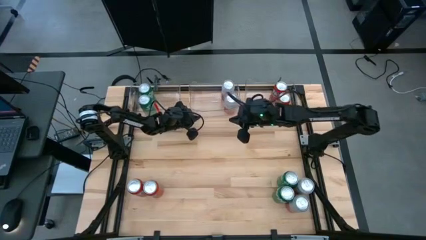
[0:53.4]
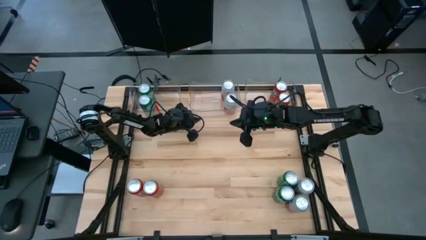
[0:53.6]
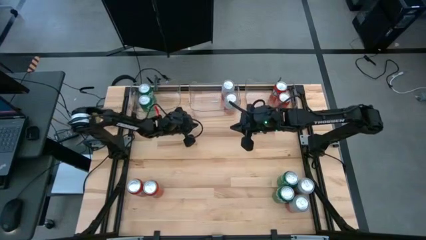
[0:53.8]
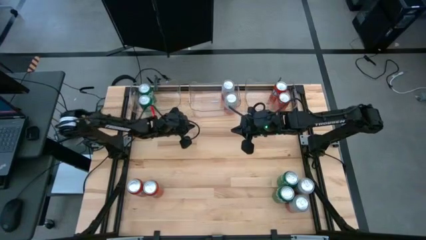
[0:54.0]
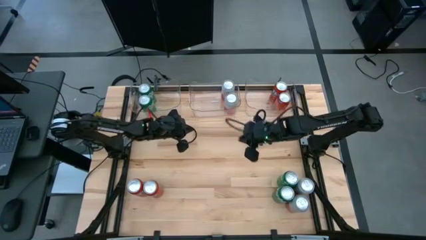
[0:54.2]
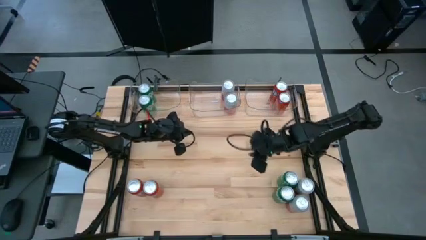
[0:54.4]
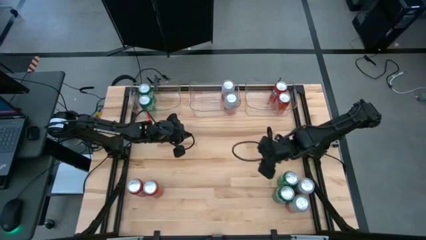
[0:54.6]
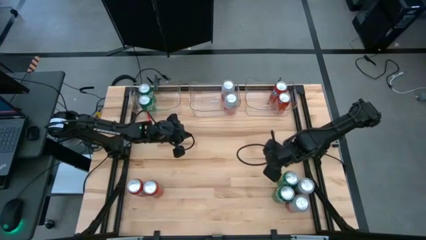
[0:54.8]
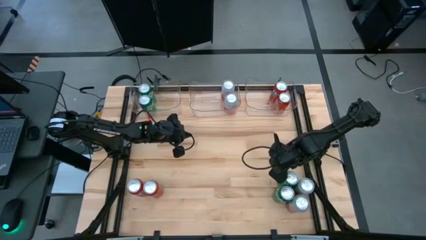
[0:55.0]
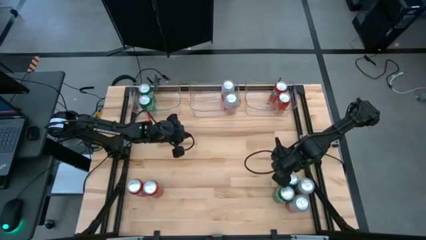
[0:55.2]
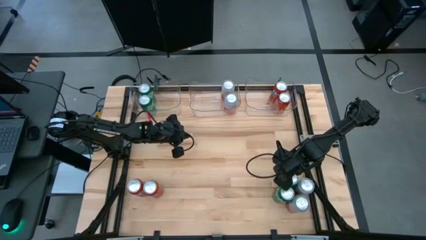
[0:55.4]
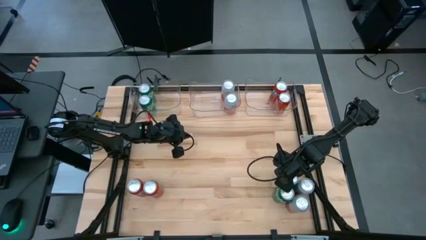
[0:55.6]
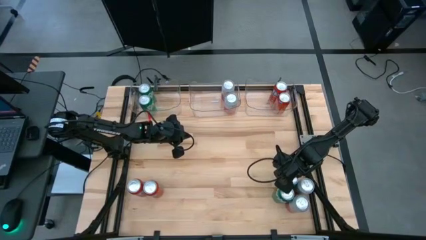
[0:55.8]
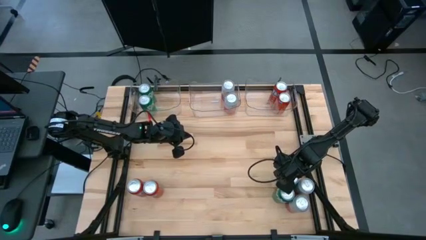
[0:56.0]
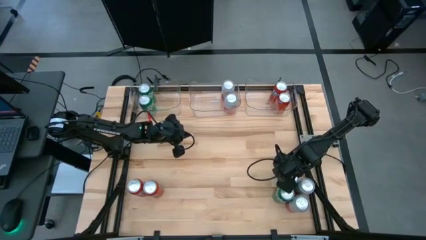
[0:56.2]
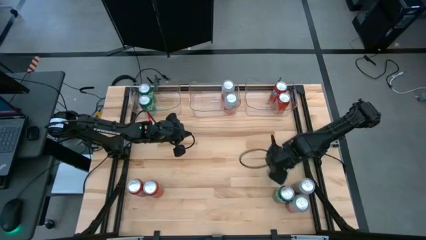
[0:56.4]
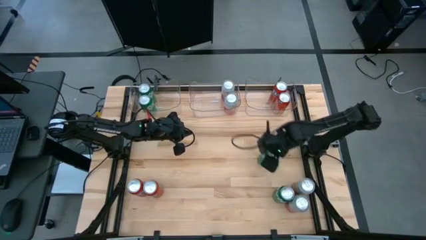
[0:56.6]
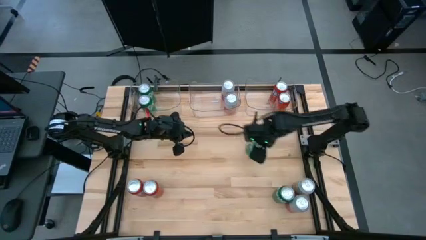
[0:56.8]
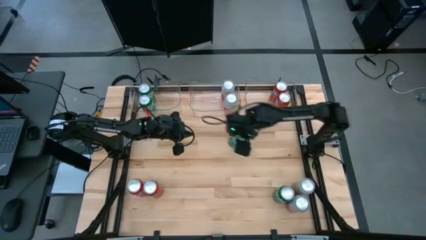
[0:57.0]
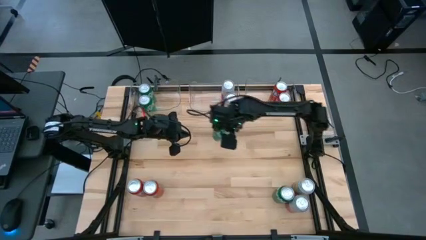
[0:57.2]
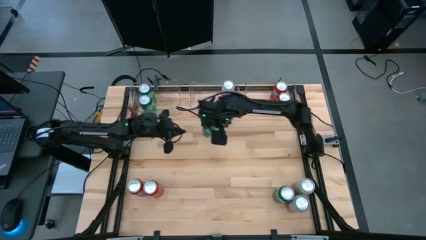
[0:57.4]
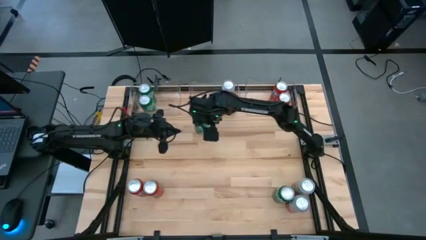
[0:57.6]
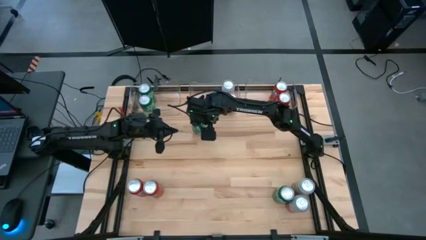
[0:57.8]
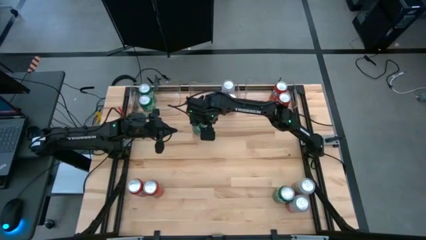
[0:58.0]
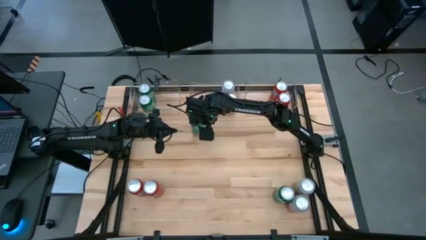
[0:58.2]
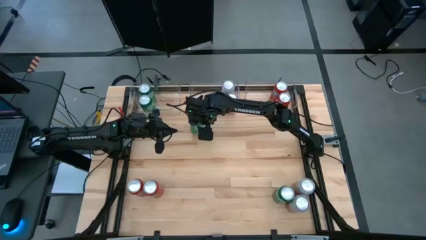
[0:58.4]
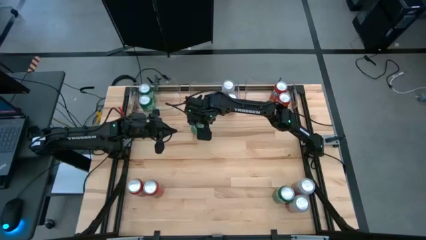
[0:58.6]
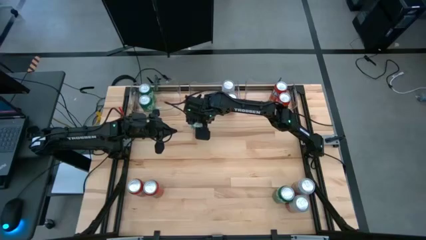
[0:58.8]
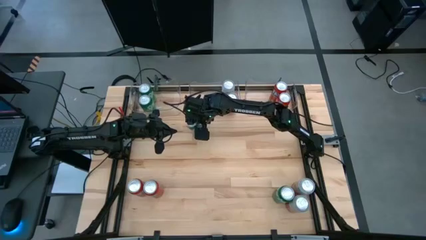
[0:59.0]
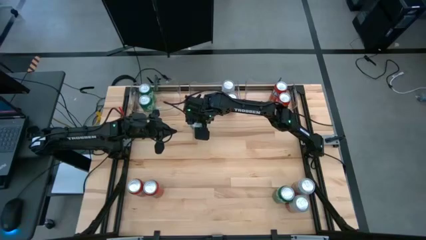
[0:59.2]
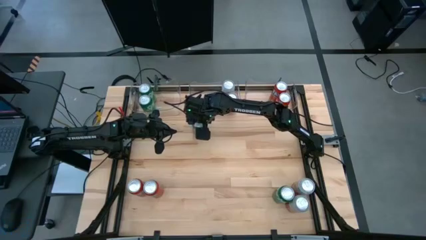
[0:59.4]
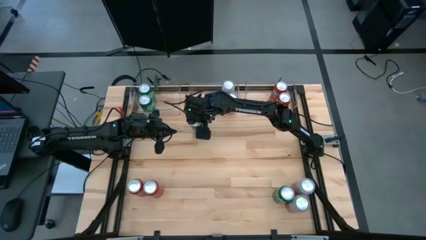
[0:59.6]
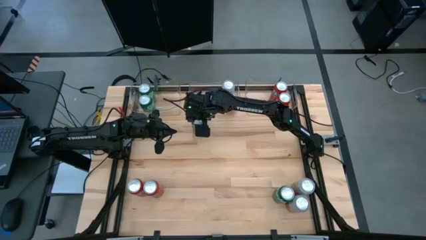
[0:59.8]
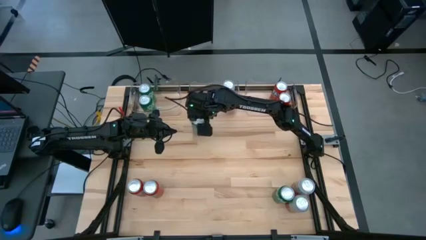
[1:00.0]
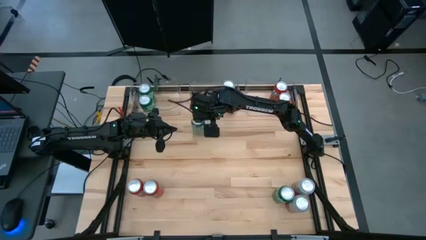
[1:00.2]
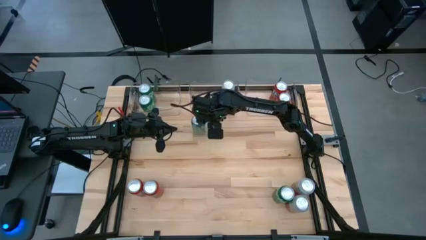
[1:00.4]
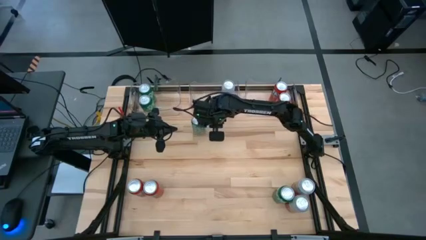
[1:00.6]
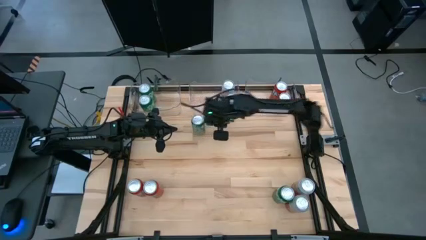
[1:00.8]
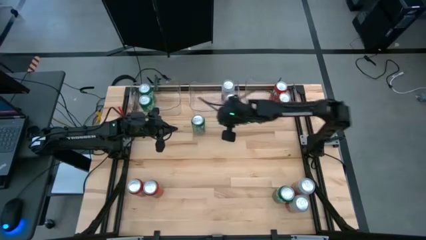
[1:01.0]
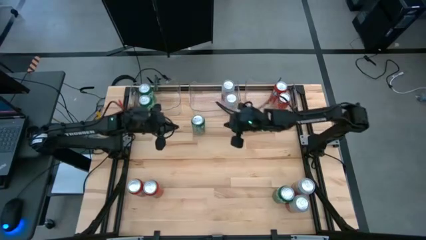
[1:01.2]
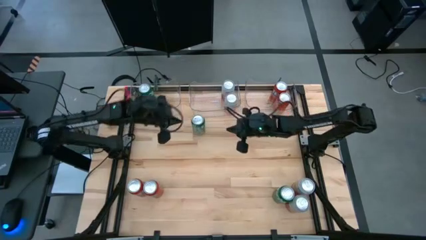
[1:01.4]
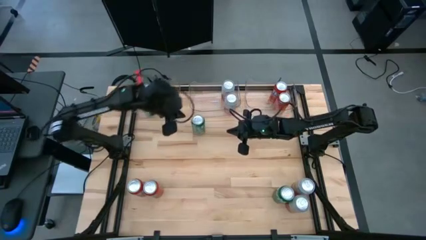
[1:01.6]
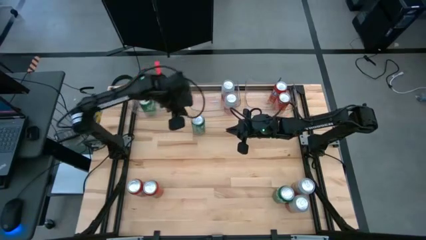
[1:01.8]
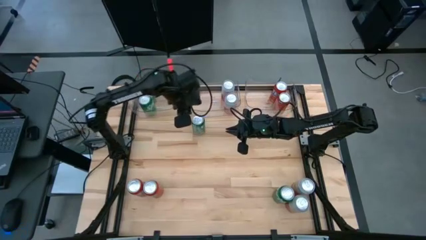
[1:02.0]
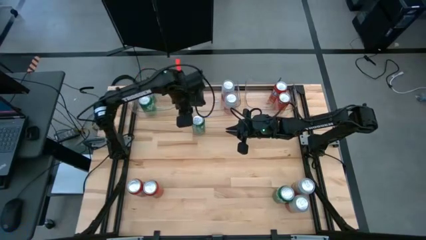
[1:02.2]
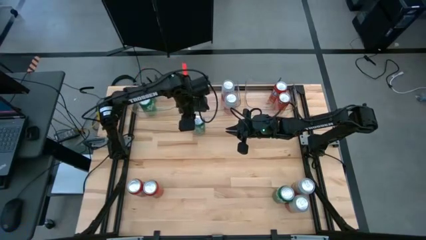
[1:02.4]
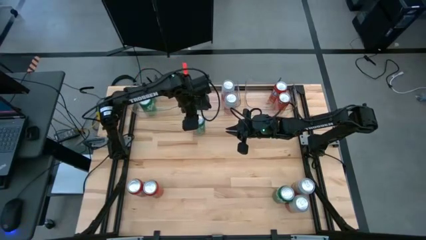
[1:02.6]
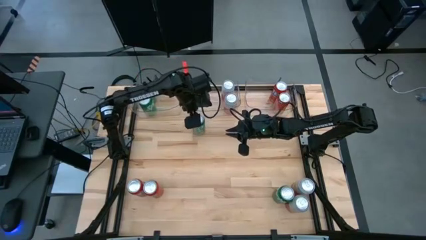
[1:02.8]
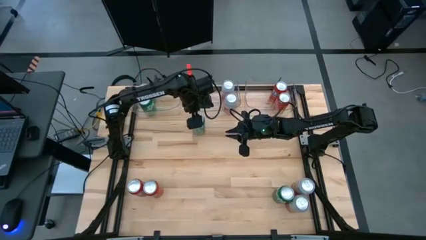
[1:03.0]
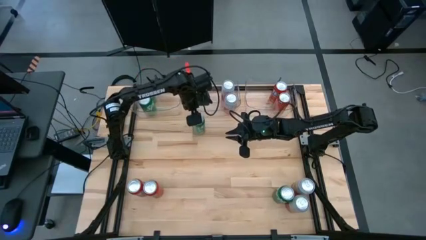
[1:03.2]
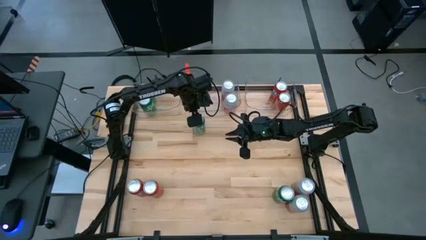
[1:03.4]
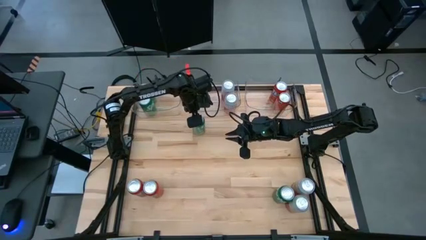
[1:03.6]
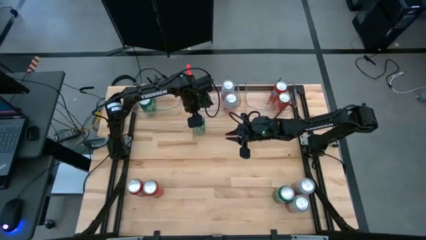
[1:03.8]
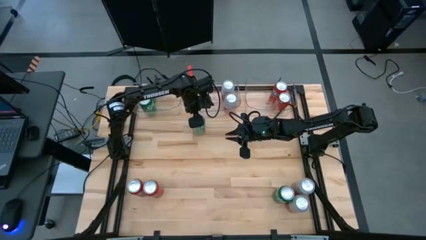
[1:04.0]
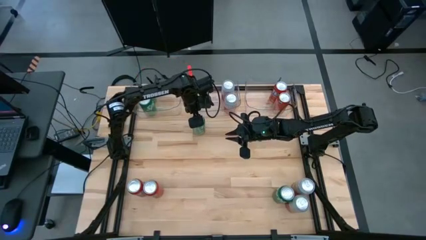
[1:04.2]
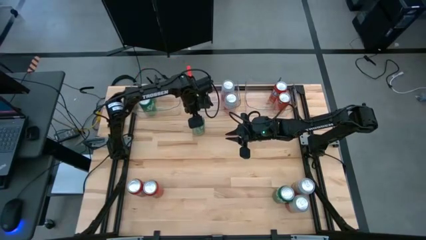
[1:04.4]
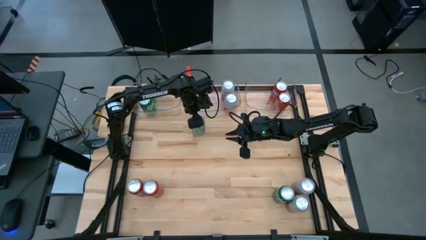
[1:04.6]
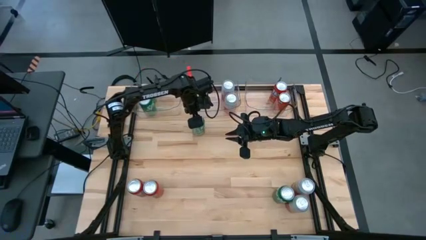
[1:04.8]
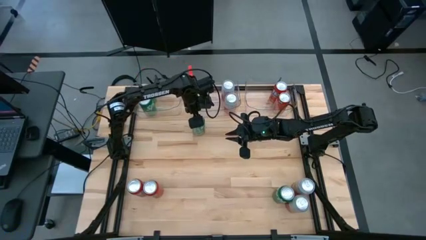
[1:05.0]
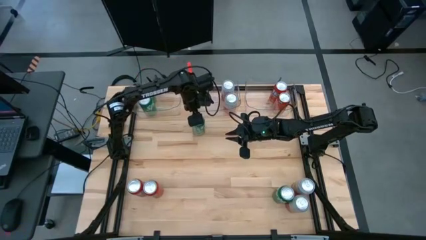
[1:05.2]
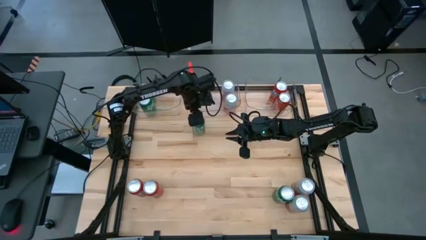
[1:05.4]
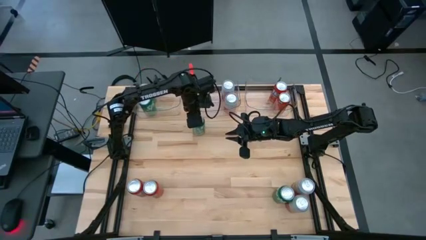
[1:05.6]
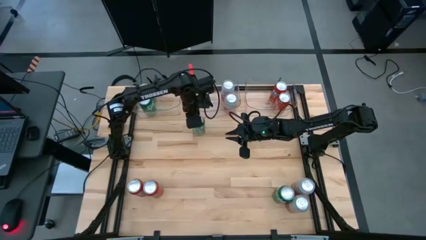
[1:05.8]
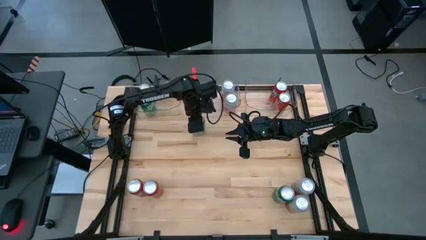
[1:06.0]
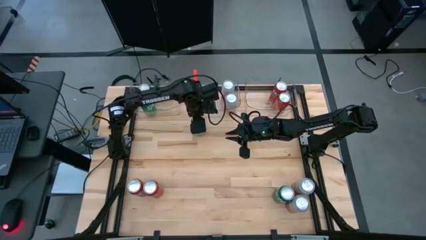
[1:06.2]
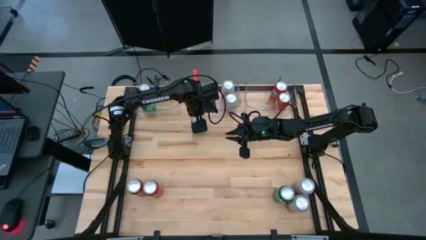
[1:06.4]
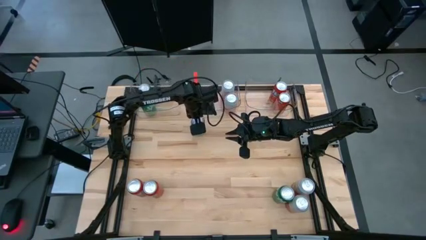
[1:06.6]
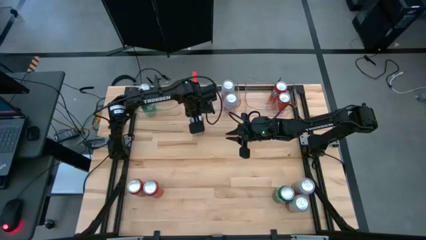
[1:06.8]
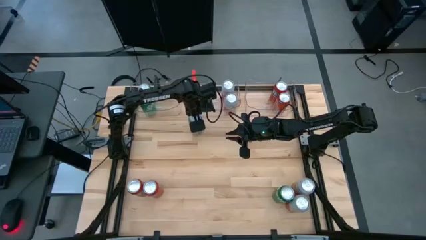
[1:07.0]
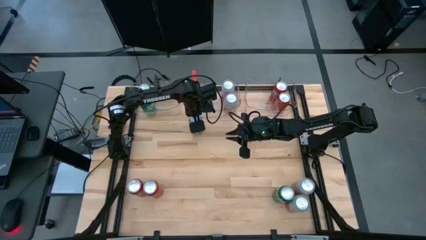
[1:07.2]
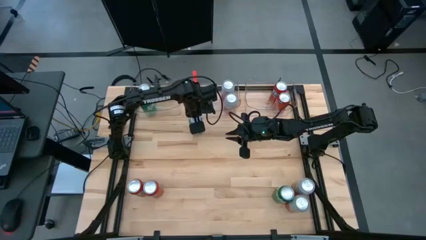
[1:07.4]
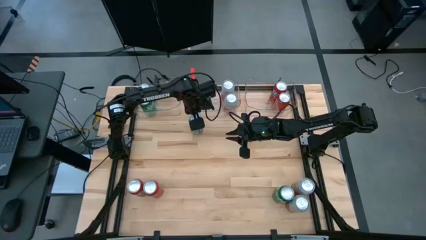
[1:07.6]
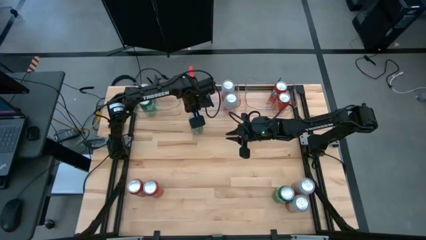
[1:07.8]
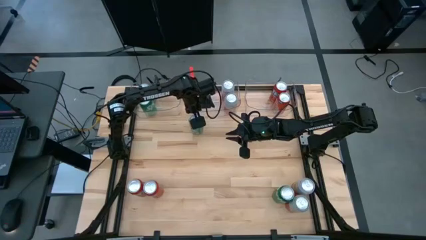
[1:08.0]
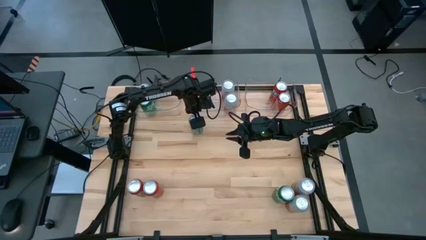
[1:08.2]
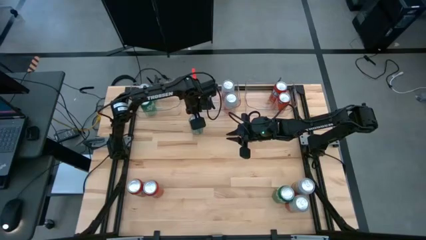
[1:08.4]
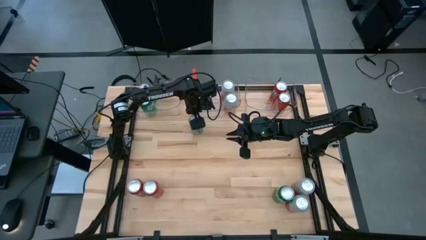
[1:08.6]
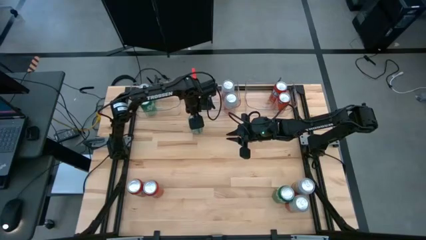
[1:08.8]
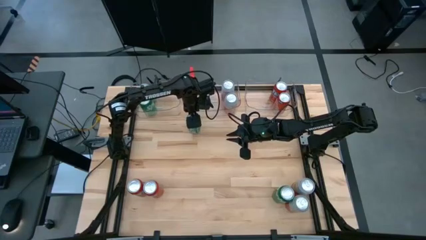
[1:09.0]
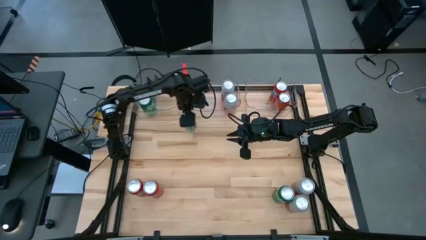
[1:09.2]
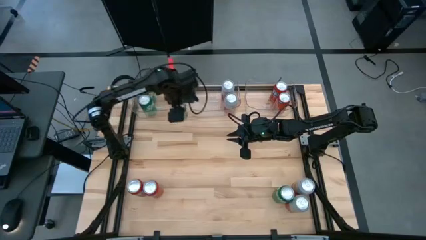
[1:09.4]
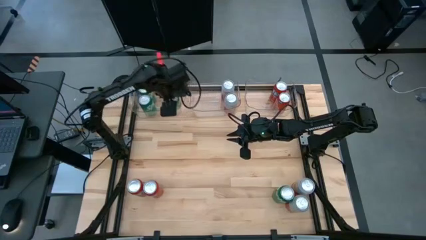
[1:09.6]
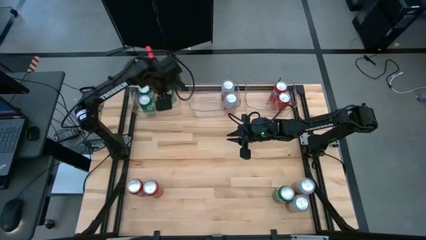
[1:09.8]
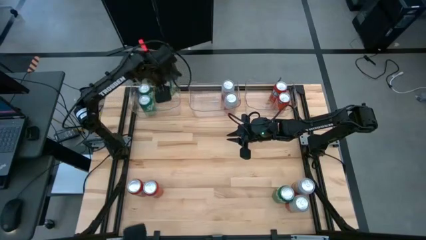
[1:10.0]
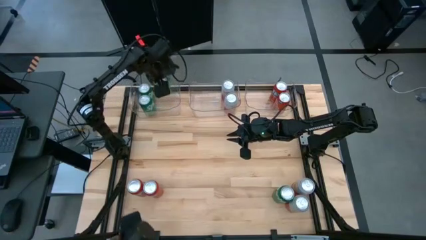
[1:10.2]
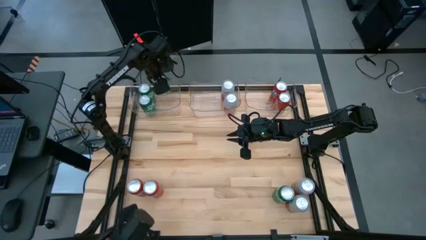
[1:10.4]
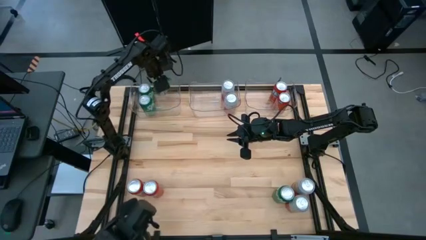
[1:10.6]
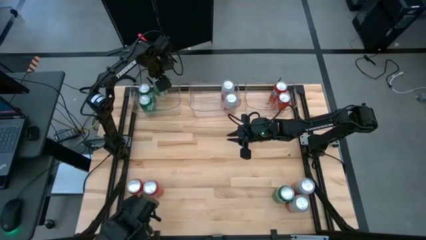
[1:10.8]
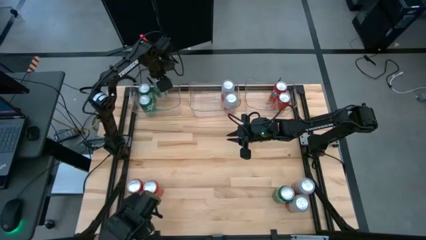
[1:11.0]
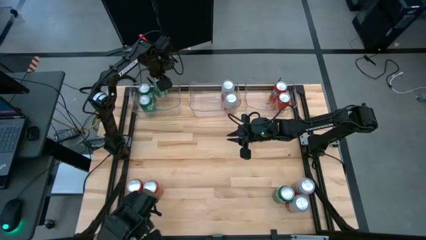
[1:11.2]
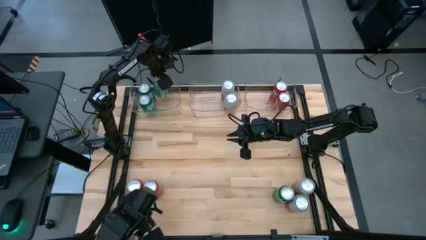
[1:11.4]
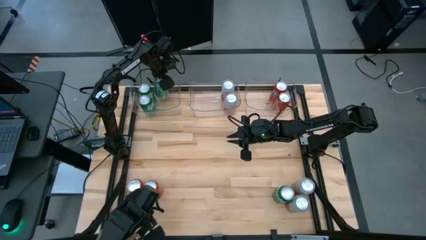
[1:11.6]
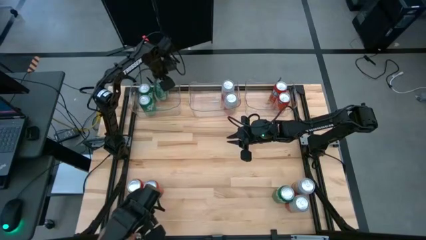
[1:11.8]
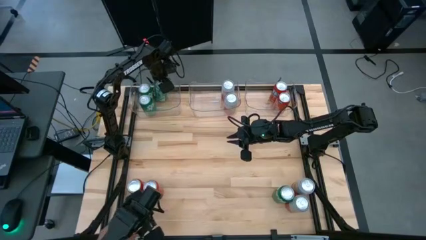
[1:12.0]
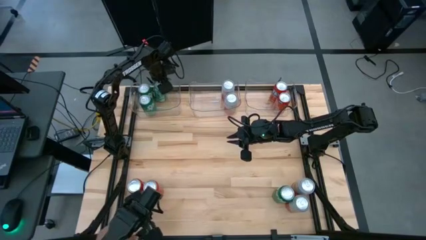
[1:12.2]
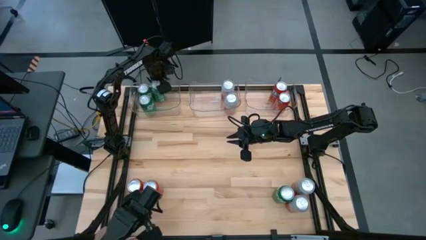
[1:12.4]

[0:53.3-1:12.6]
Task: Sort soda cans
Put the green soda can into the left transparent bin
